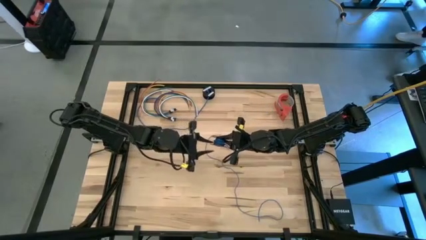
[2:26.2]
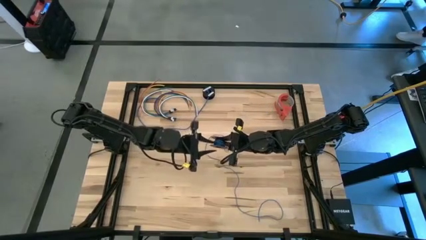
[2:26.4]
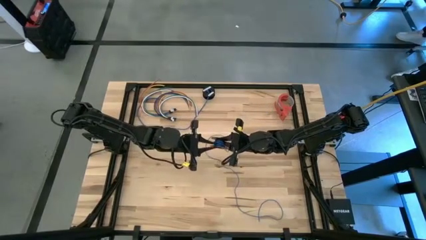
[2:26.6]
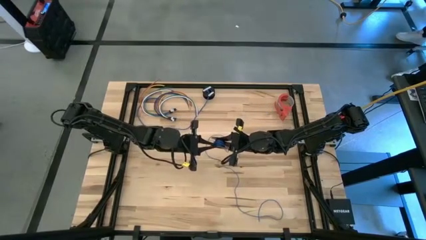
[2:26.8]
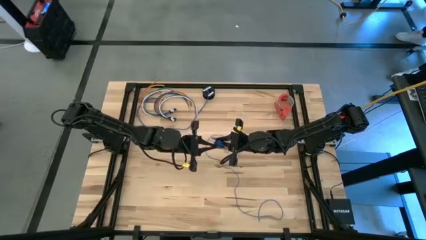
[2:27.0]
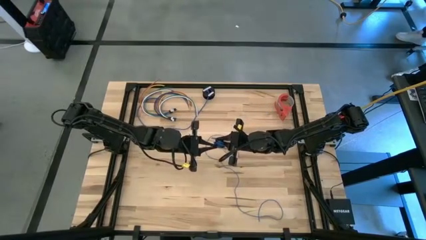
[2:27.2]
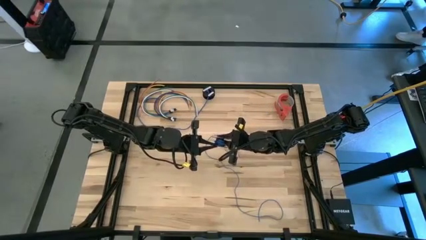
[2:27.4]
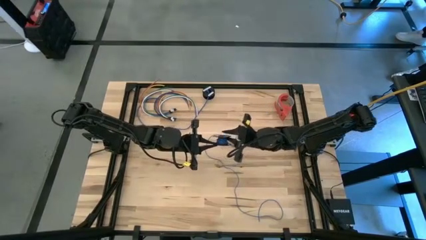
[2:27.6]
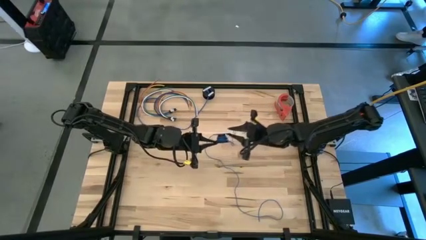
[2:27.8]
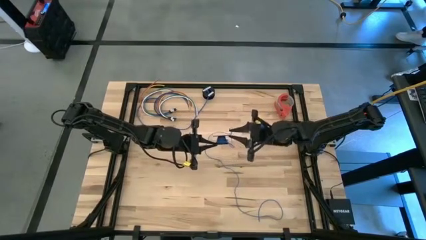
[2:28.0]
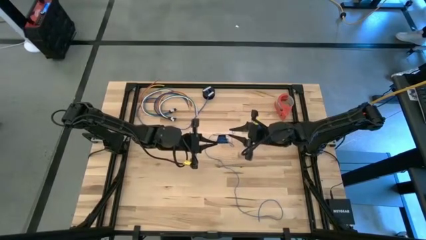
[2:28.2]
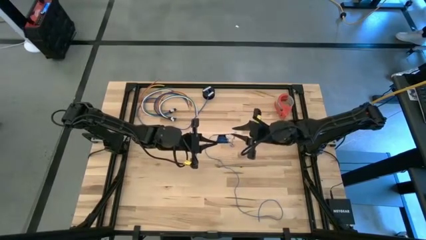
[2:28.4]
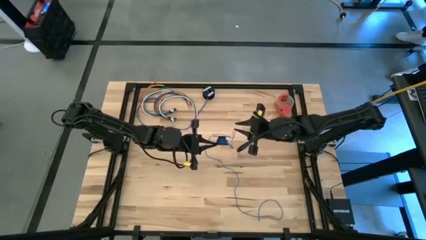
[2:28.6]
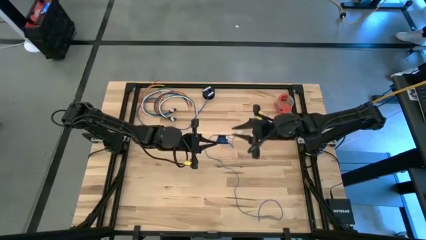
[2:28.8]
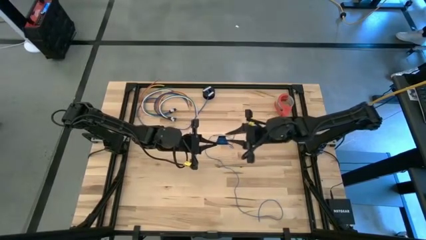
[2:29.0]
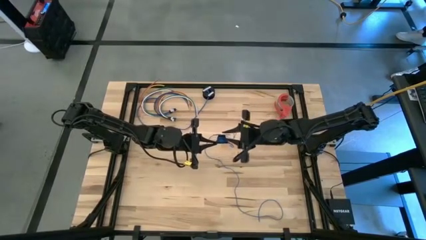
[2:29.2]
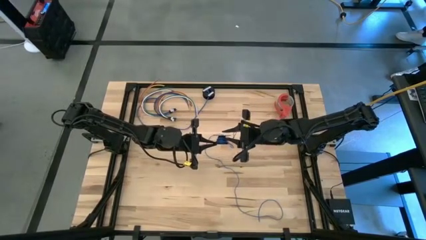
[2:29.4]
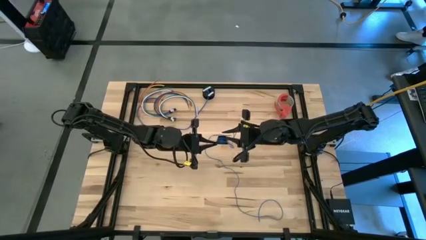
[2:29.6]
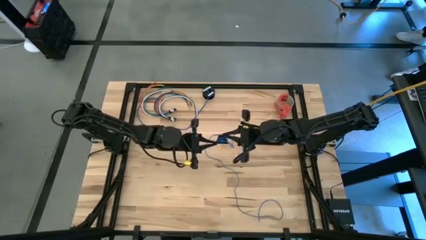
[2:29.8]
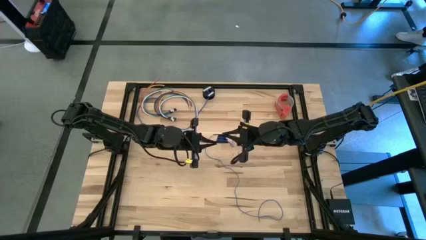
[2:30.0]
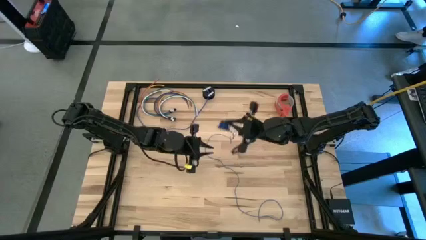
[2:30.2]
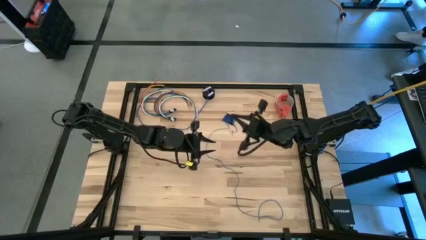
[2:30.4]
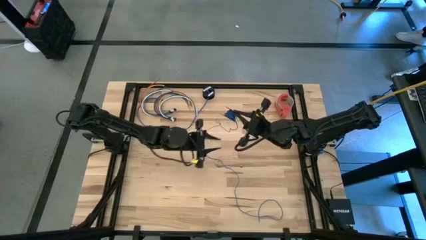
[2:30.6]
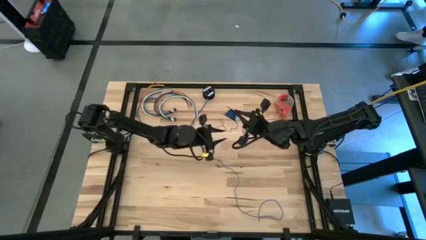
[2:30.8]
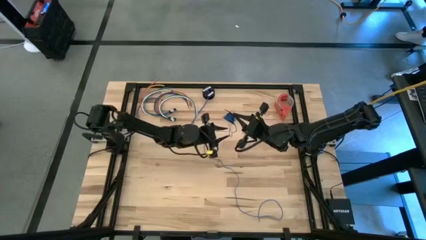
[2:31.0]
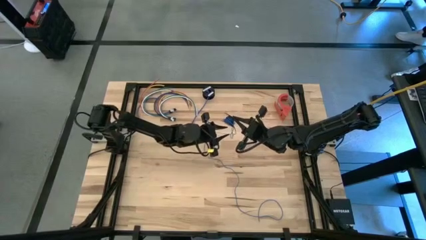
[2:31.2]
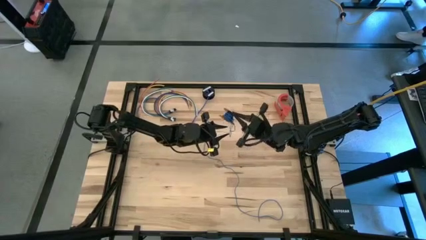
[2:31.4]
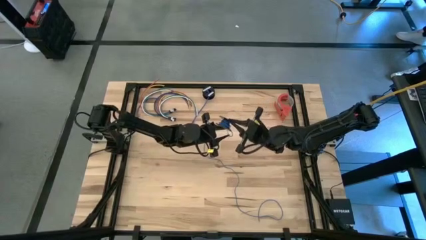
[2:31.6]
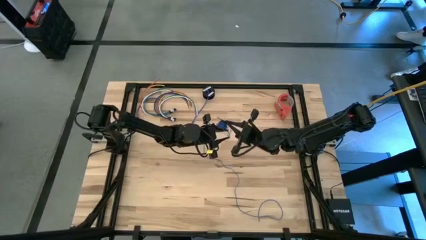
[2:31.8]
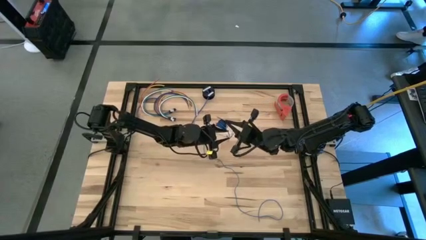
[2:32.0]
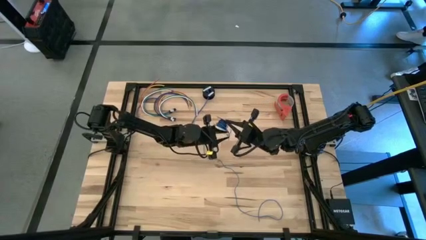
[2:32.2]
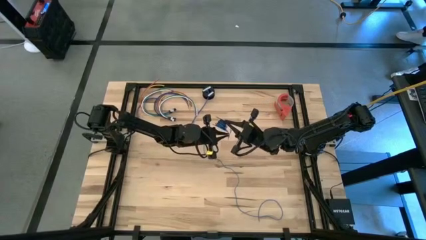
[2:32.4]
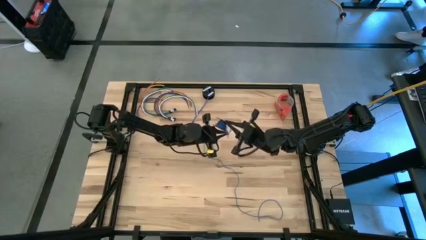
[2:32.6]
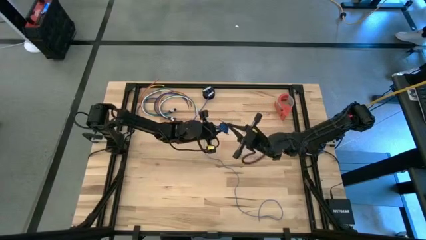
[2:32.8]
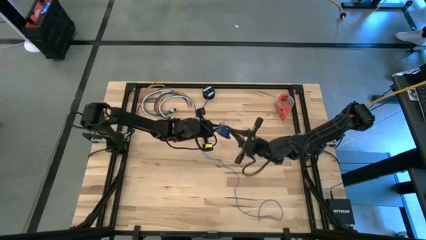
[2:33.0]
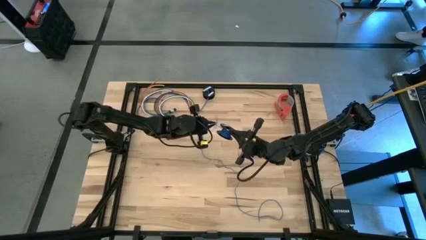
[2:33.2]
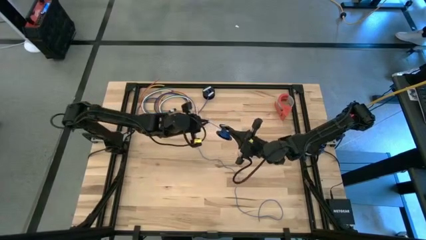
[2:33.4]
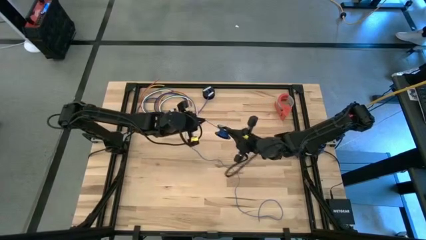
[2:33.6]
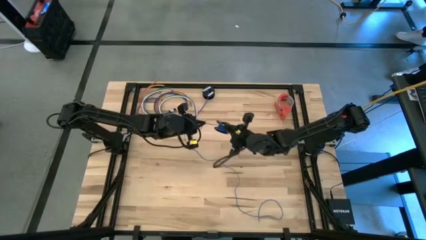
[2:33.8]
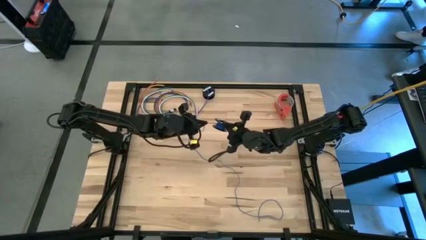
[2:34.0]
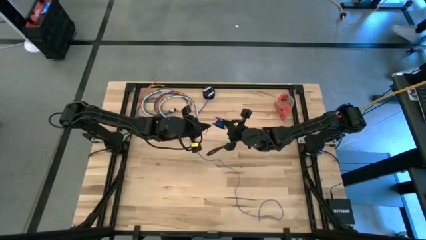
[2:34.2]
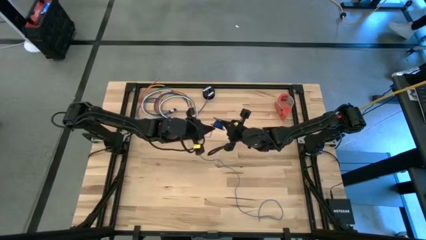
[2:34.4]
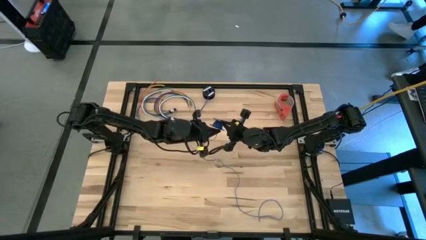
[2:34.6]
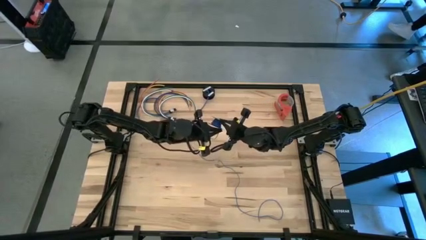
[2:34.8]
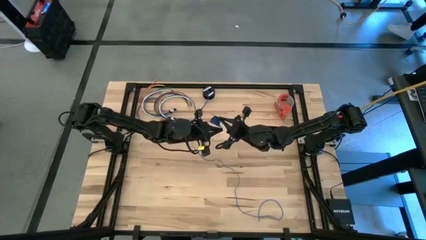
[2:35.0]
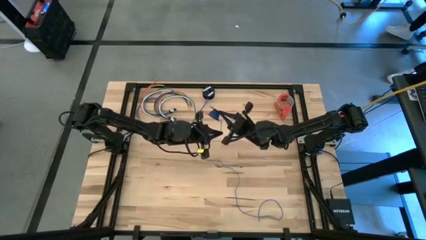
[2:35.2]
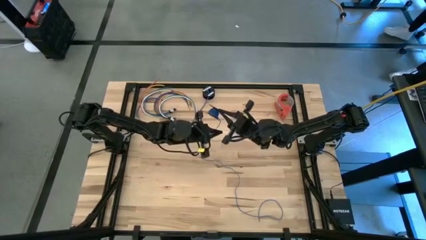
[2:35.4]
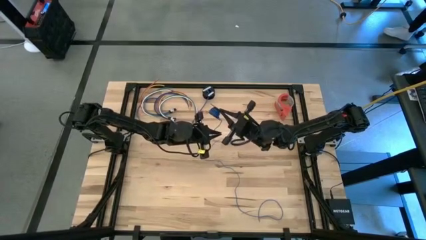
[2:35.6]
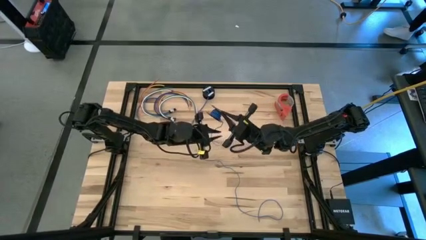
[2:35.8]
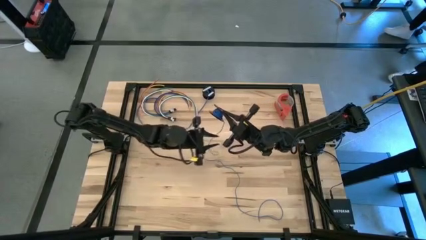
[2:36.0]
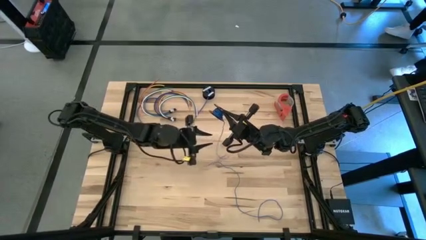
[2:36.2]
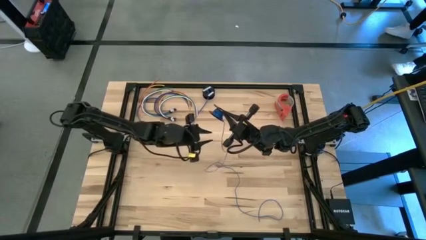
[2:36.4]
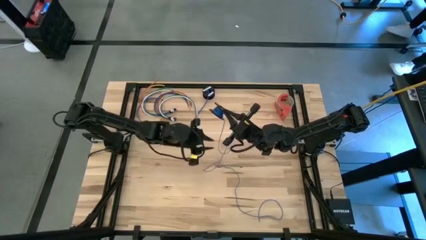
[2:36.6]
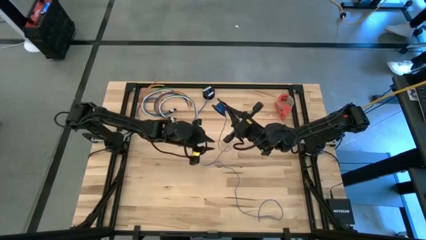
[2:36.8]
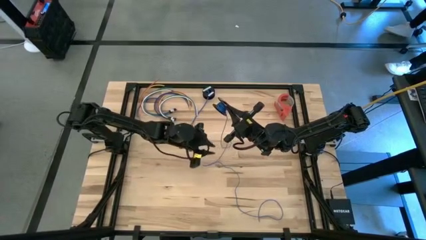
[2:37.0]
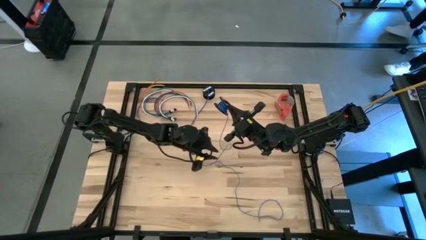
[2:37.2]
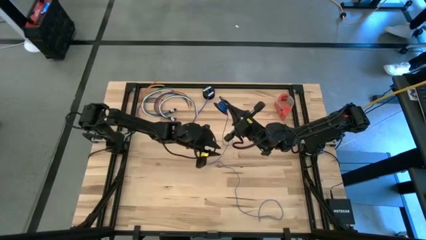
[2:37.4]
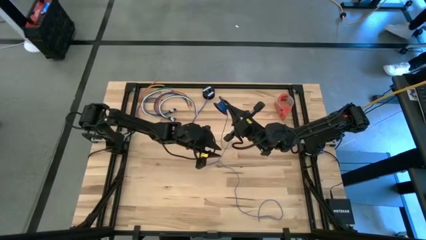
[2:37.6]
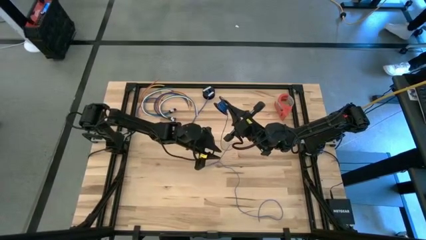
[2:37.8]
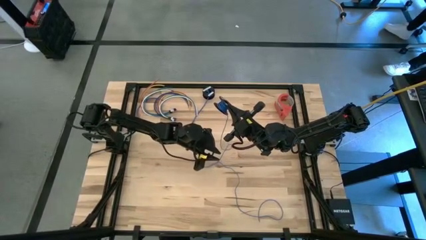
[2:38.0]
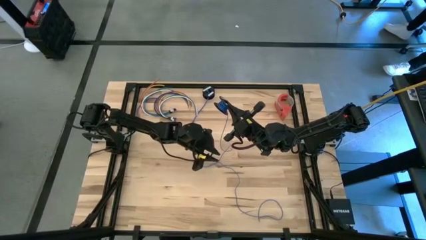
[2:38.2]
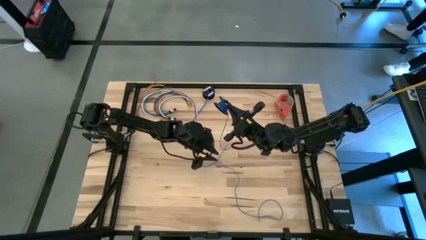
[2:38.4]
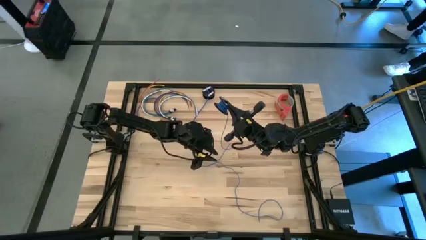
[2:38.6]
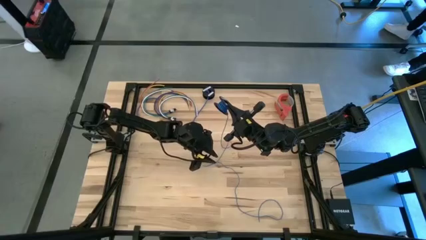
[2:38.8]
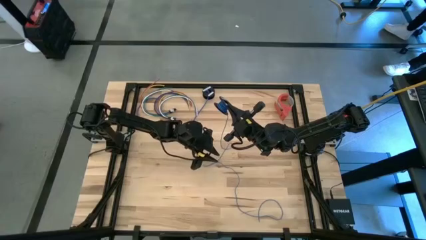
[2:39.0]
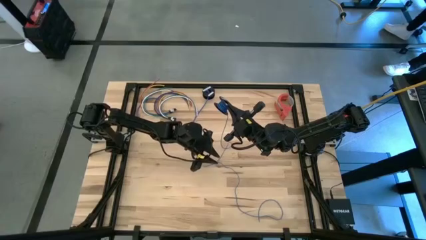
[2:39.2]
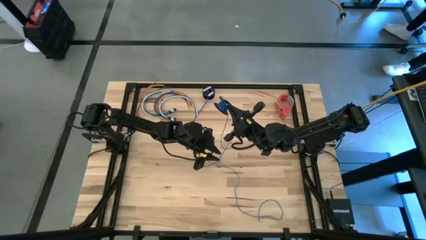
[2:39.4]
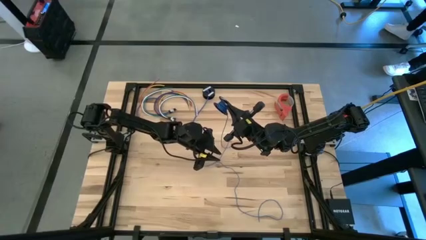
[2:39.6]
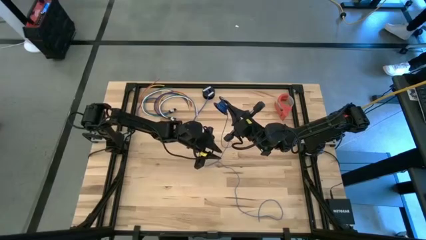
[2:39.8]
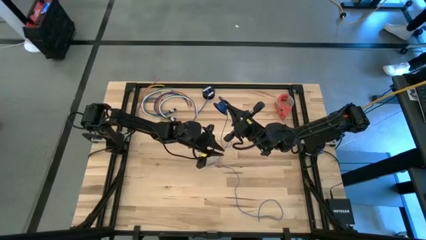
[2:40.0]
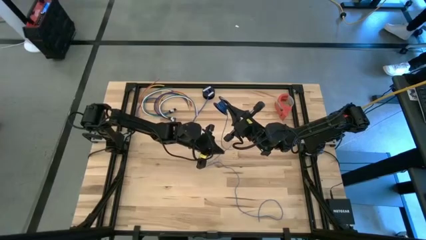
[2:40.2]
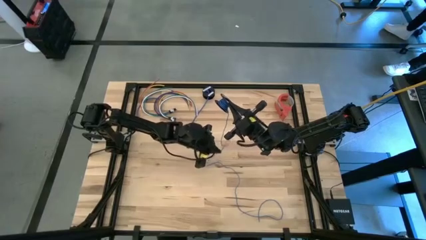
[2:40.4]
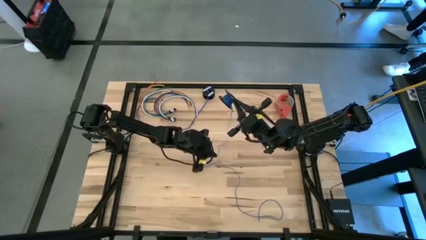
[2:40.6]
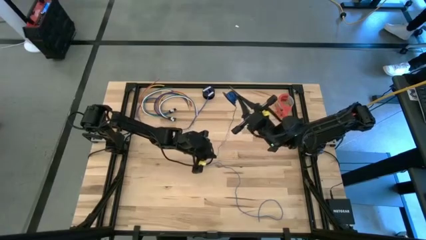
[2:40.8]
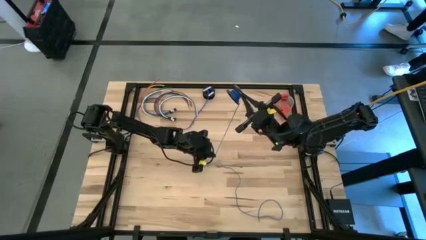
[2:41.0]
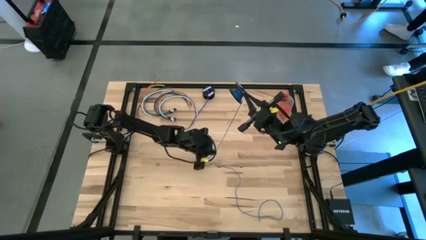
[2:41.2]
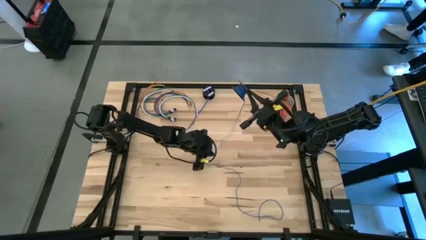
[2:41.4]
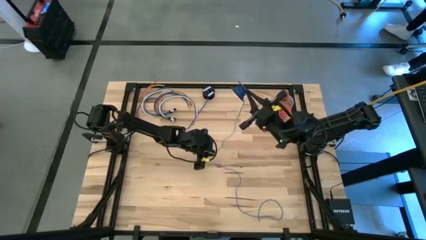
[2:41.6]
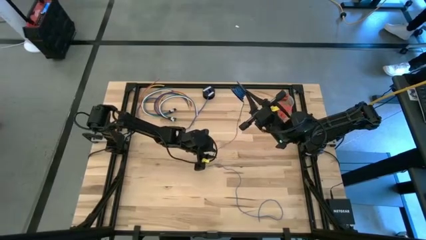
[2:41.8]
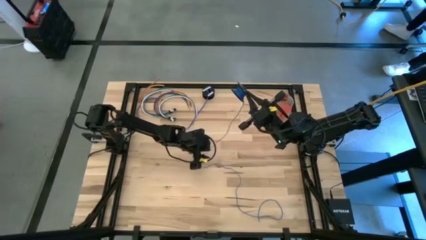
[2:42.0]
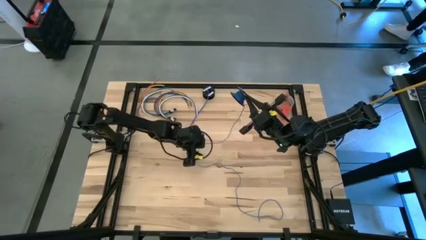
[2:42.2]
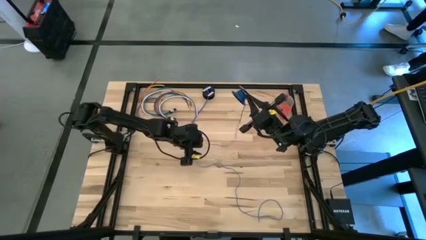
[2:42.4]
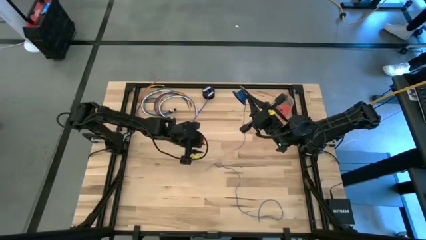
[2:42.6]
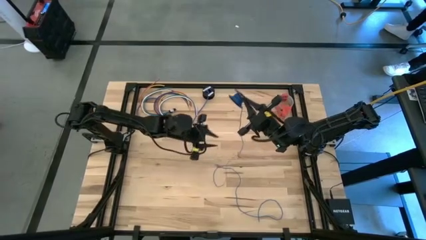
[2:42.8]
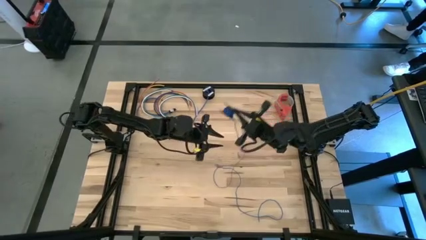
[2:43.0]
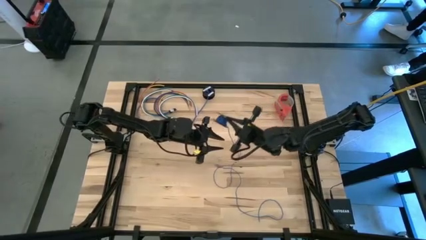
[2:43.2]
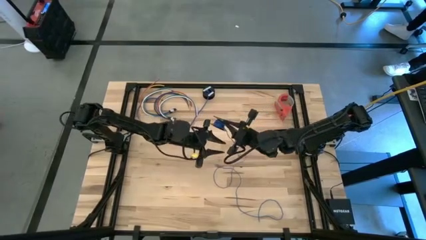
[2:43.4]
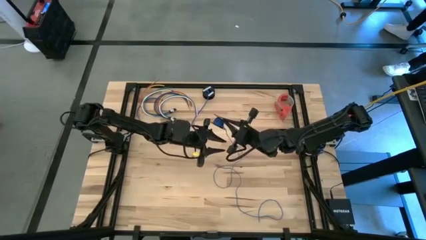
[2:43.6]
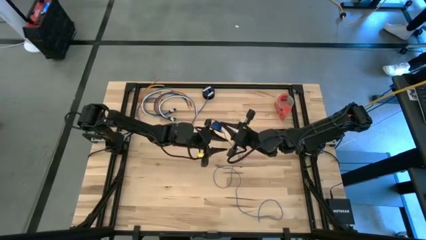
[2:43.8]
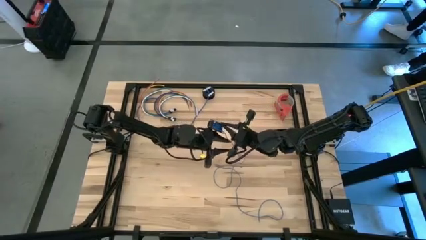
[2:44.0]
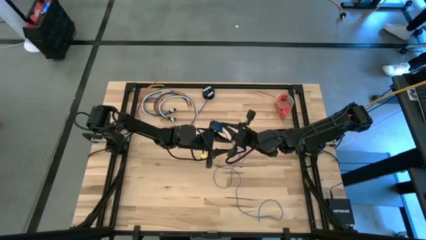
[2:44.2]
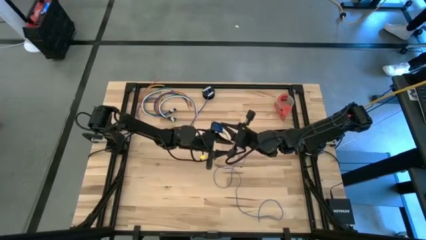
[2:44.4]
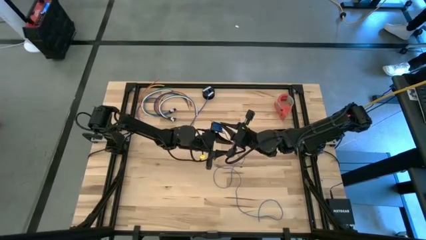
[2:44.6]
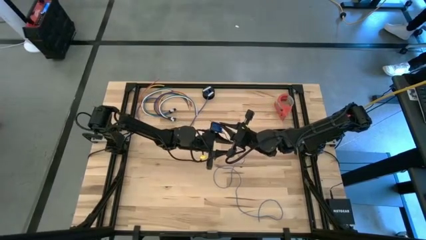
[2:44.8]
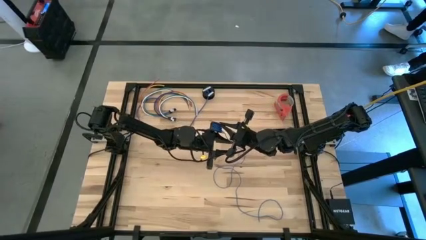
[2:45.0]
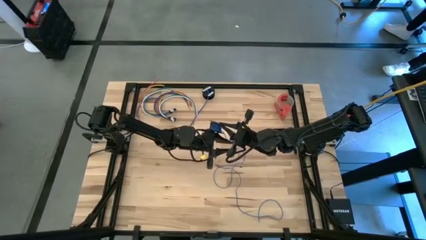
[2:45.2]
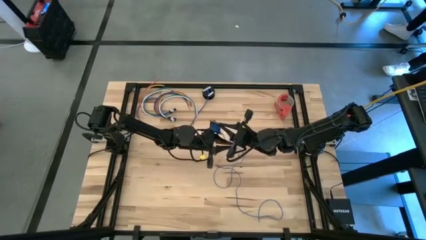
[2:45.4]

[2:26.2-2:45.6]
Task: Coil cords
Coil the blue wire onto the black spool
